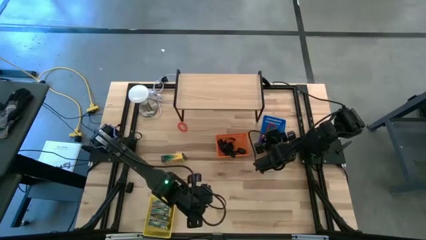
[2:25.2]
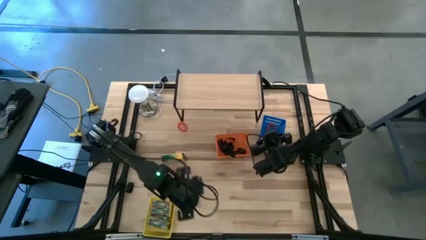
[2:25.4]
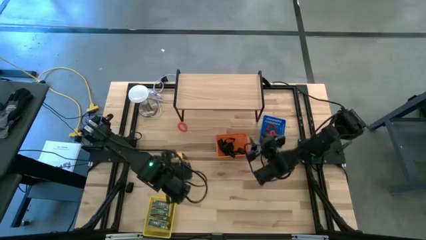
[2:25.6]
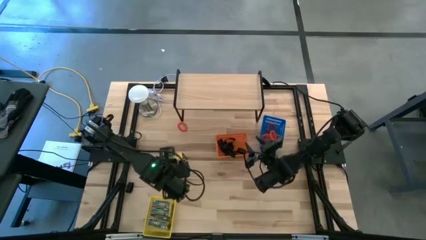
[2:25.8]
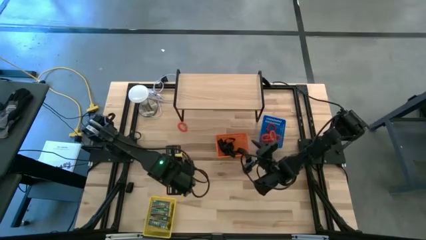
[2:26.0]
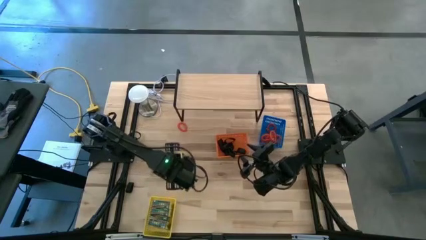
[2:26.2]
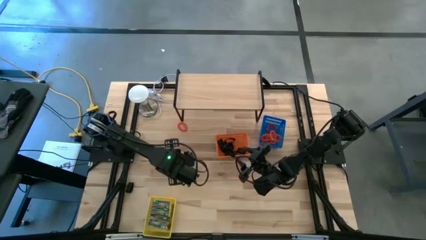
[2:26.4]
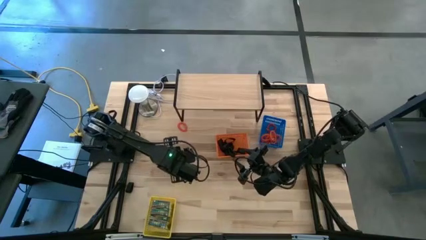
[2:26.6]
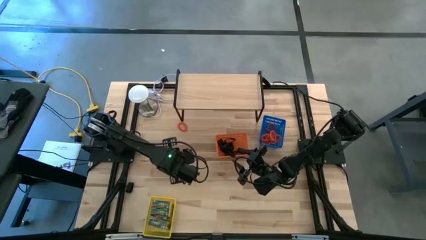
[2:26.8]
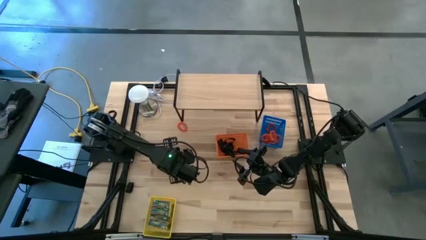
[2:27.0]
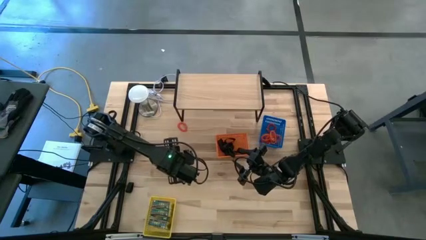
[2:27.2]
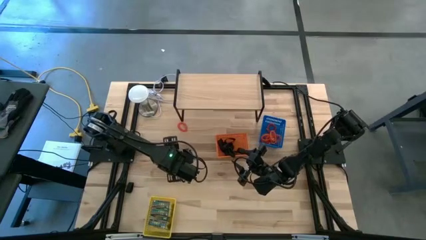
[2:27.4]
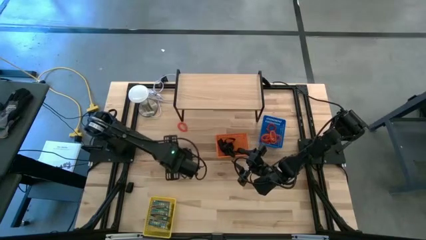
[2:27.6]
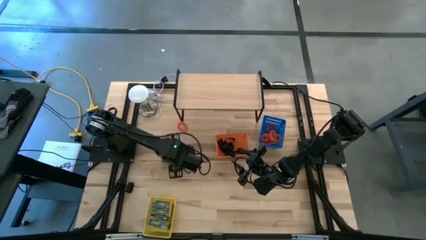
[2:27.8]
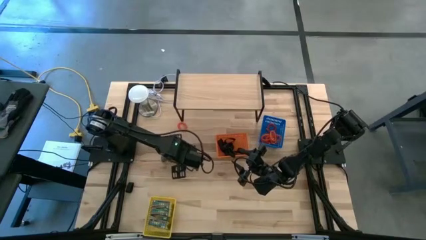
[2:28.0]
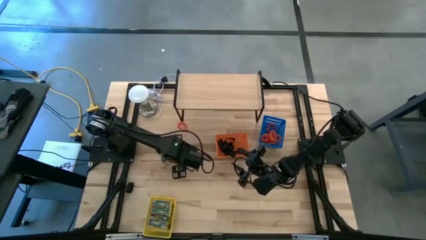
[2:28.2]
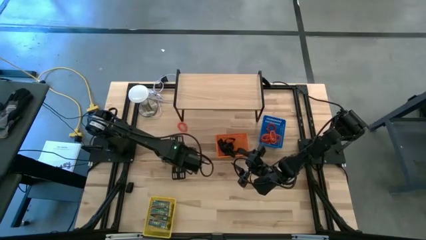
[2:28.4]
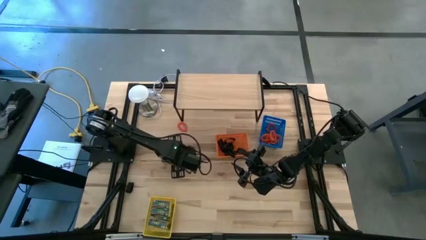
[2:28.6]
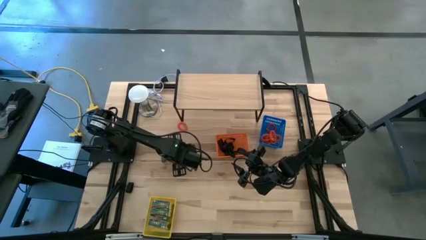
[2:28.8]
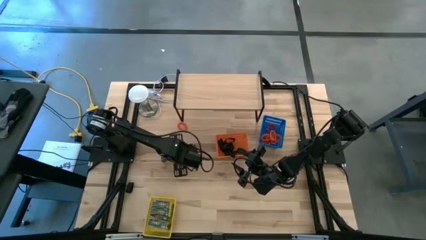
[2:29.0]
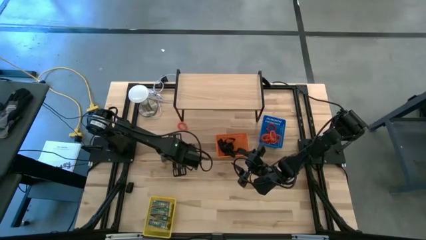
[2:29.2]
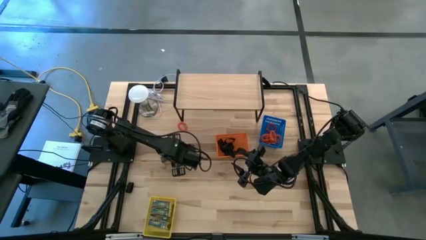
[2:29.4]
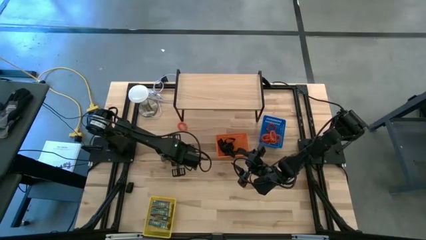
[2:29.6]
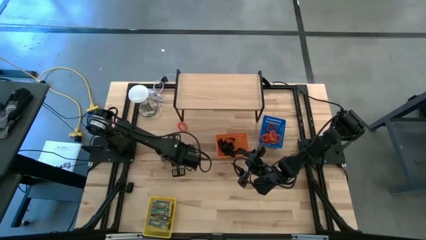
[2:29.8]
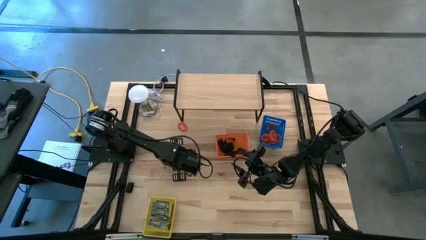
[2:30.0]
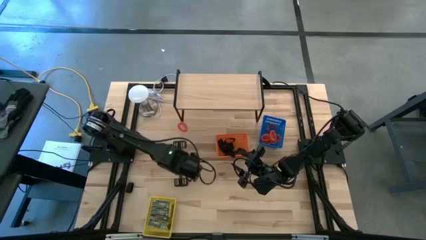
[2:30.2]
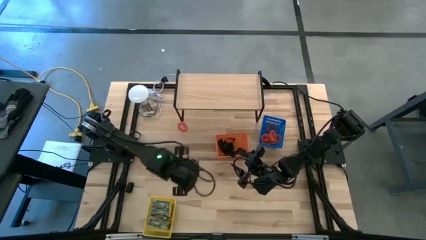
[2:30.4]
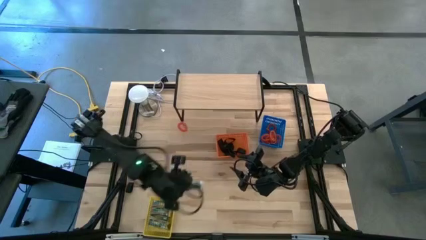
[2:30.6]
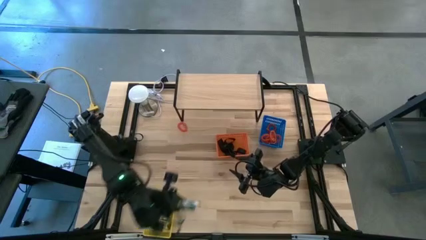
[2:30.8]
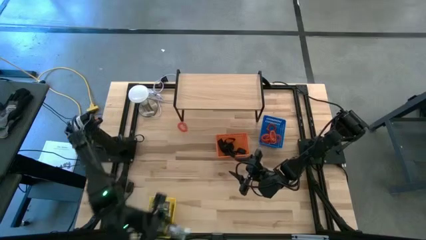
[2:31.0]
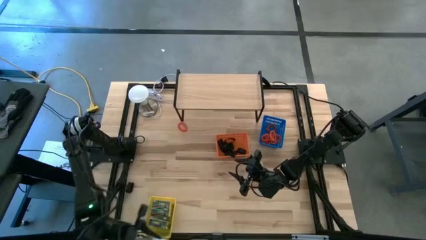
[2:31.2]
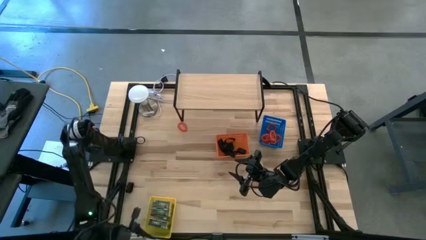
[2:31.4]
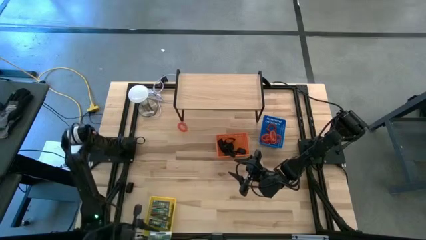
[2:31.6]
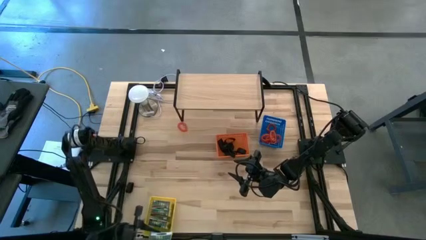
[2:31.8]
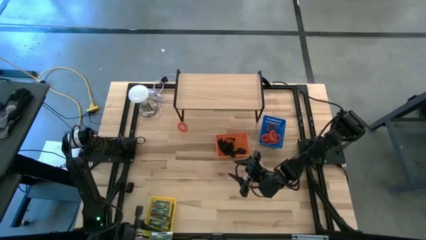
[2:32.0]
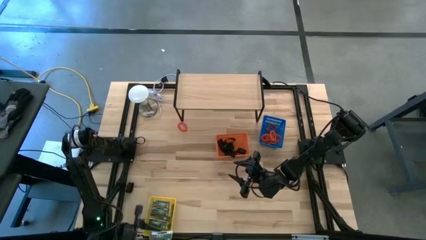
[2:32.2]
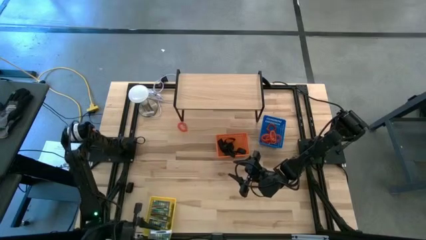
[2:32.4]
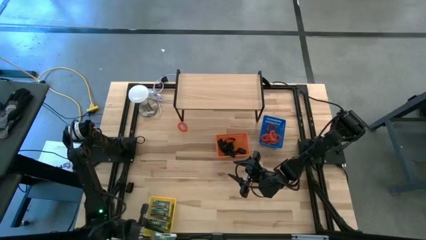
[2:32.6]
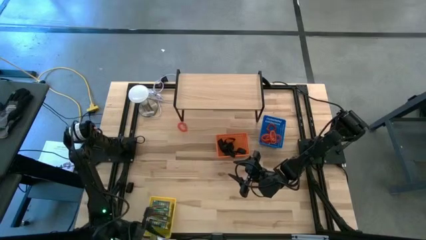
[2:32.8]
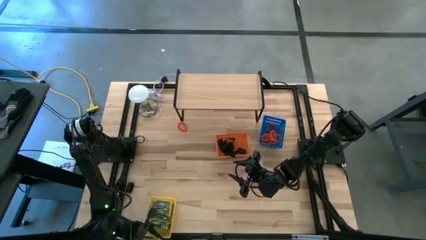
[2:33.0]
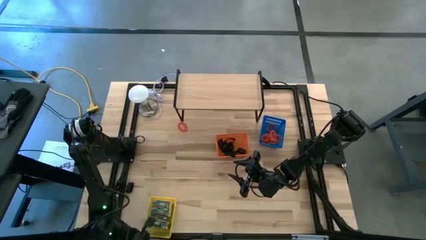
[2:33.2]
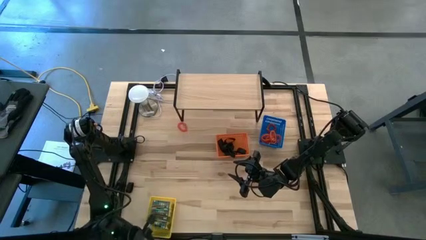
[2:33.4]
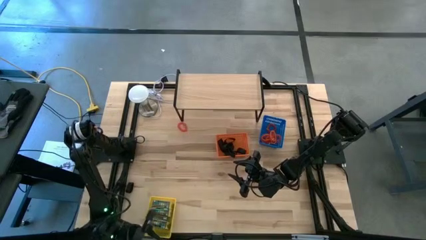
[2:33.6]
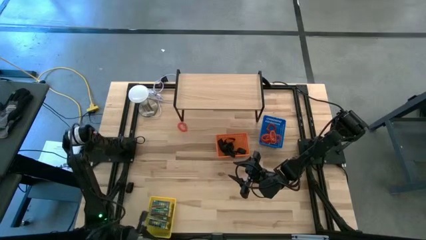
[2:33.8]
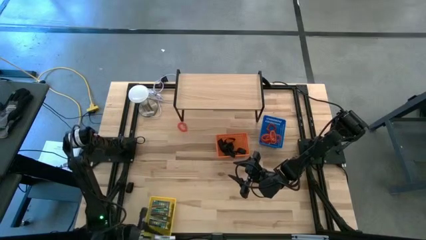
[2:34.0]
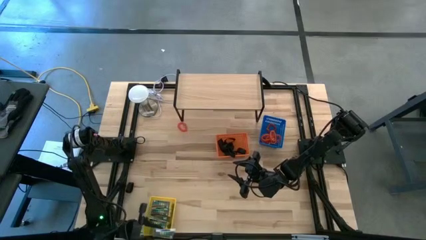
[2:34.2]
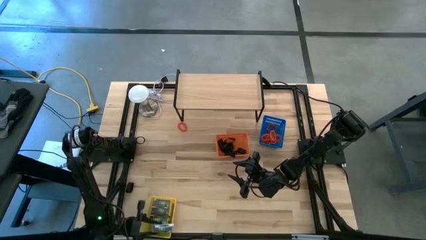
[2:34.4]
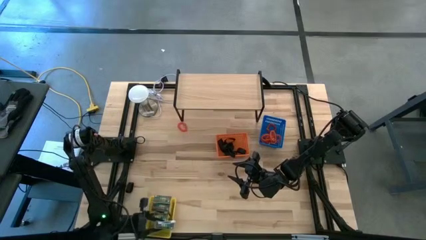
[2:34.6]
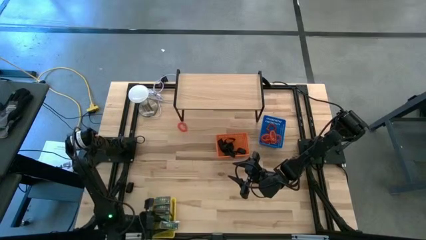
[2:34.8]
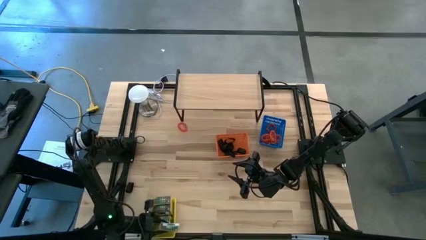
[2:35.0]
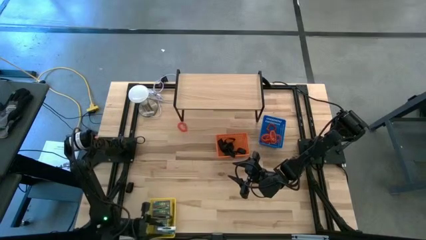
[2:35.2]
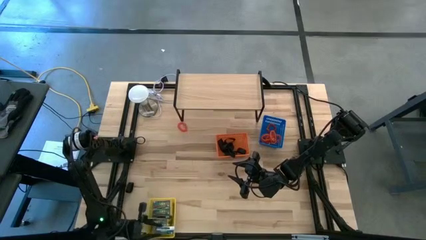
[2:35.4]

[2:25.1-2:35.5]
Task: Pick & Place Office Desk Supplies
Put the crayon box into the yellow bin

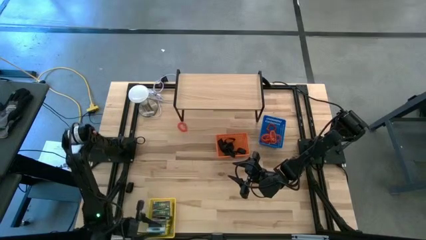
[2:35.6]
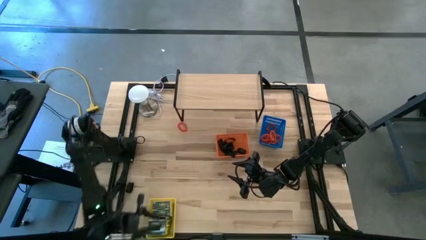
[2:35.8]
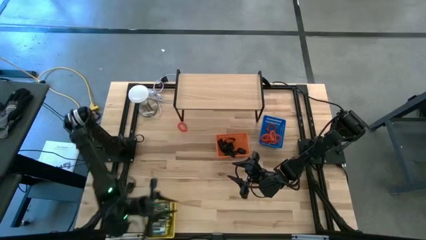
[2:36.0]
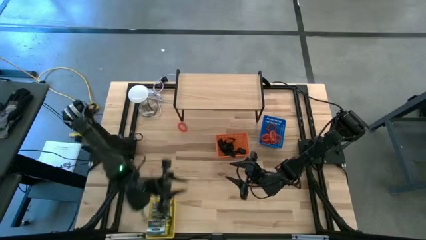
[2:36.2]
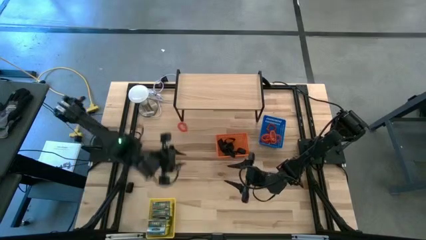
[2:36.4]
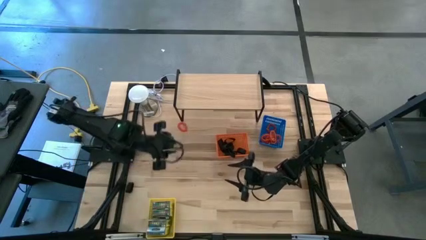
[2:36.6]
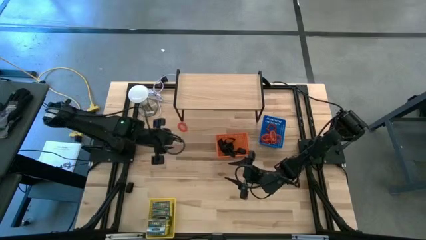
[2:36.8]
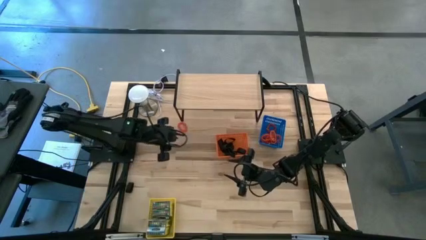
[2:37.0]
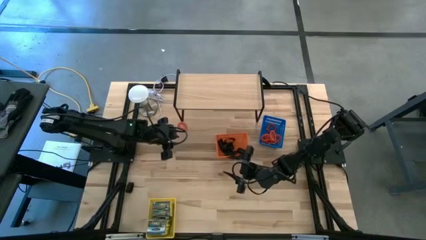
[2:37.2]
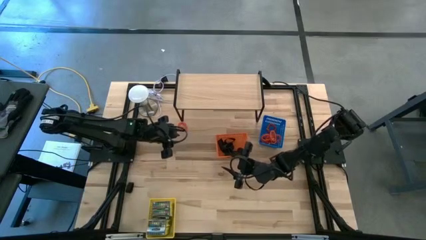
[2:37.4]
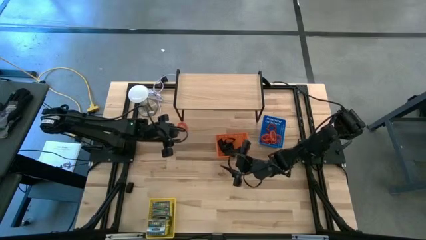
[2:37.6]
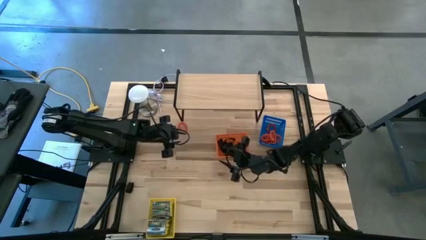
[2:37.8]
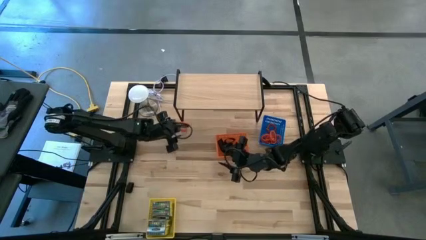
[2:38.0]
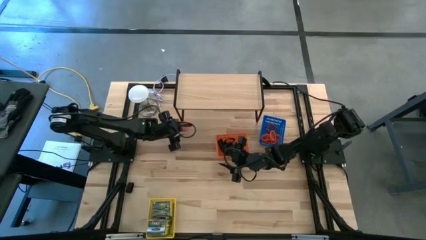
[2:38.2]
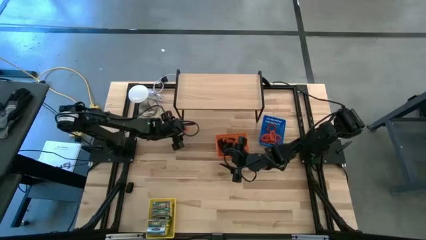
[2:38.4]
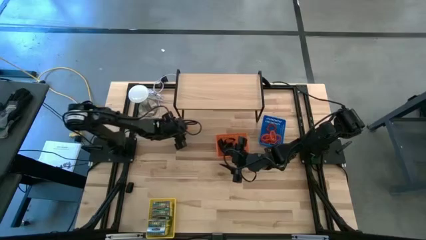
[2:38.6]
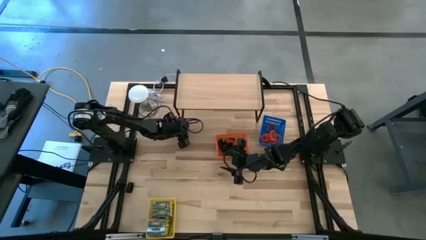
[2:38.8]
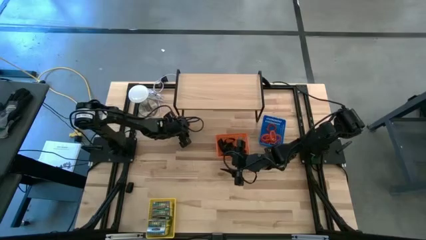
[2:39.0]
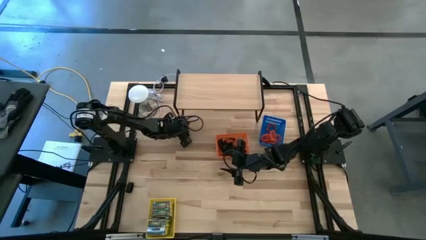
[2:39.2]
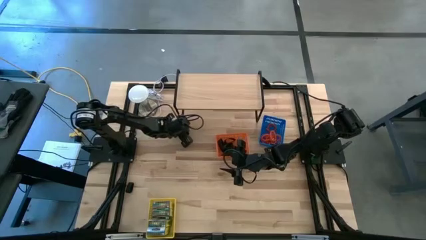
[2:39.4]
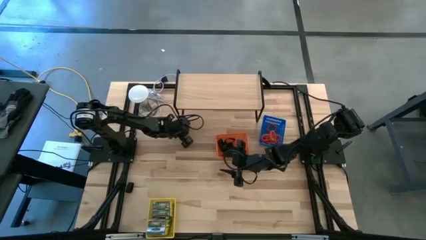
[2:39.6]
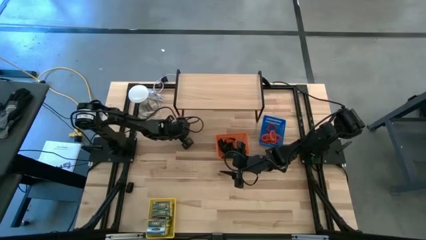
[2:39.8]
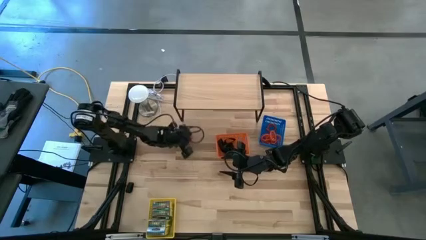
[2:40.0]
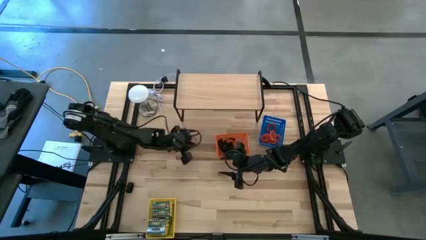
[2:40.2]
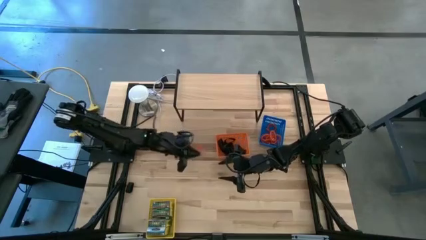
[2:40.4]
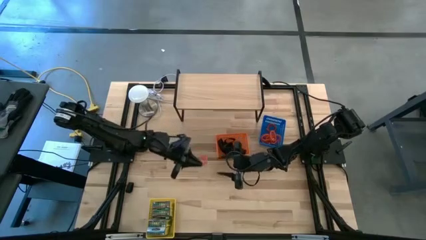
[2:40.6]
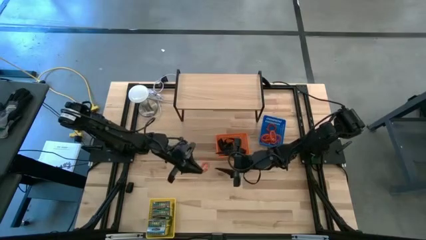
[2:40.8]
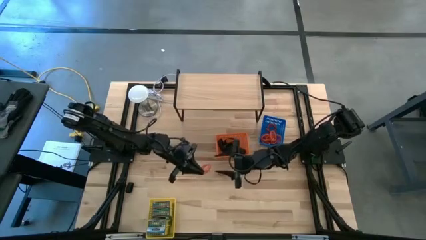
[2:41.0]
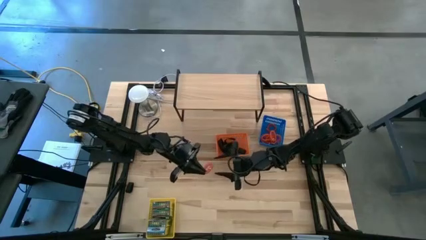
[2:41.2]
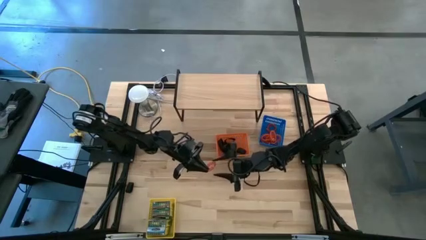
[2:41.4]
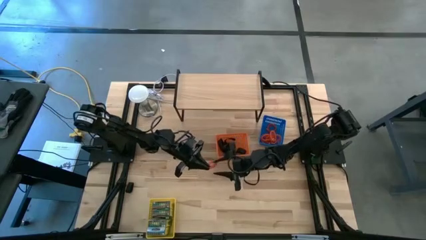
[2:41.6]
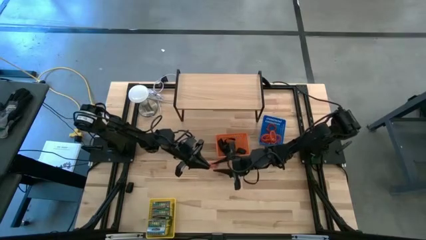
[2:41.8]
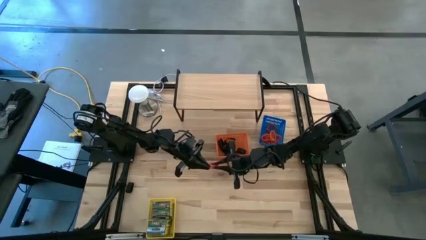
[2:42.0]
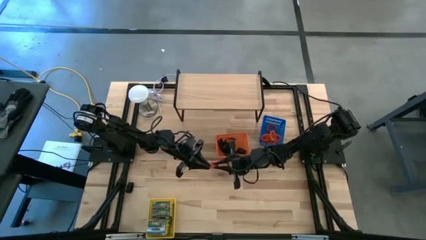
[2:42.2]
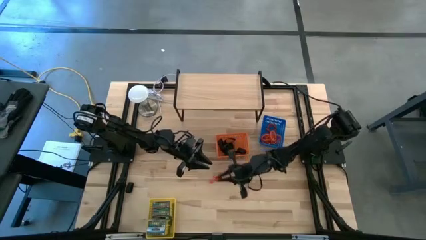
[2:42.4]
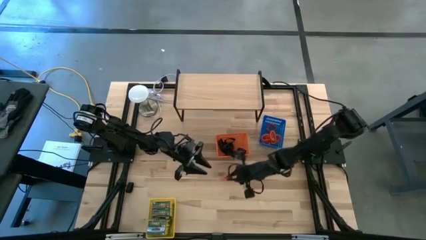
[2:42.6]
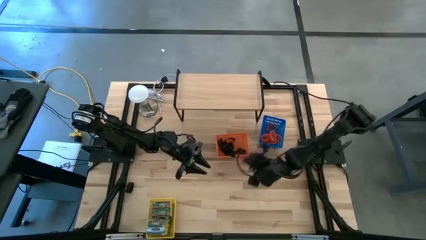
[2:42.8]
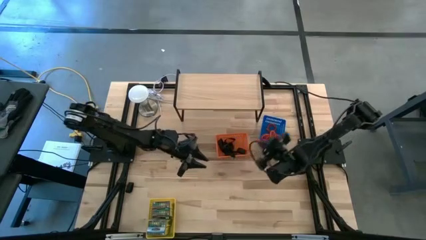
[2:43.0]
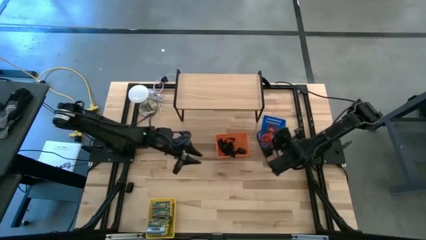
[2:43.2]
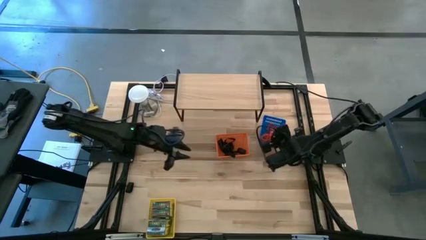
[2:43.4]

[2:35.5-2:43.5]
Put the spring keychain into the blue bin
